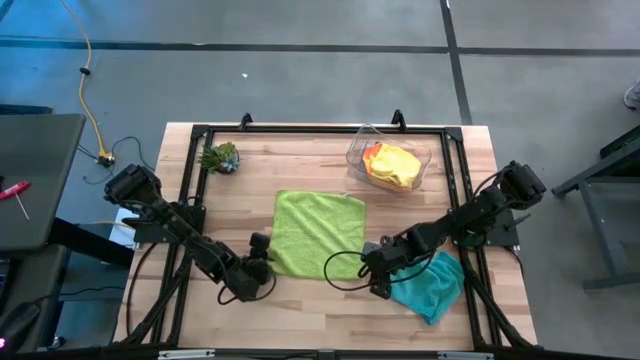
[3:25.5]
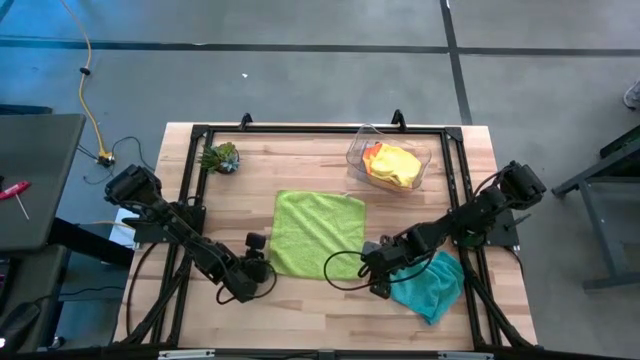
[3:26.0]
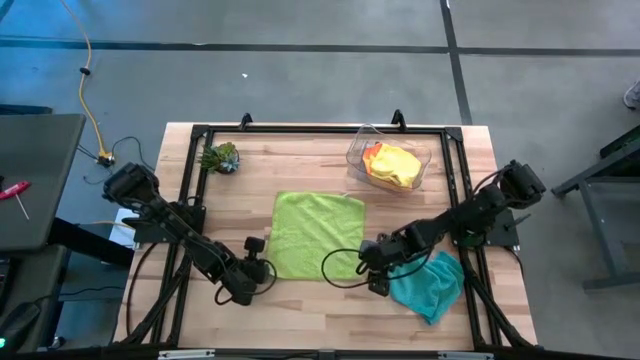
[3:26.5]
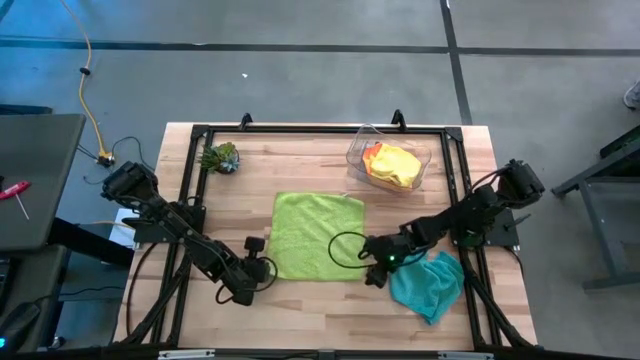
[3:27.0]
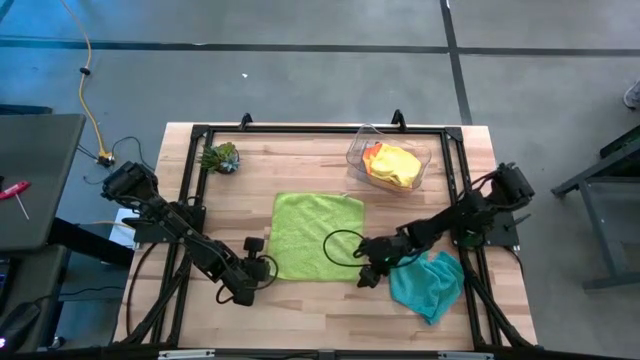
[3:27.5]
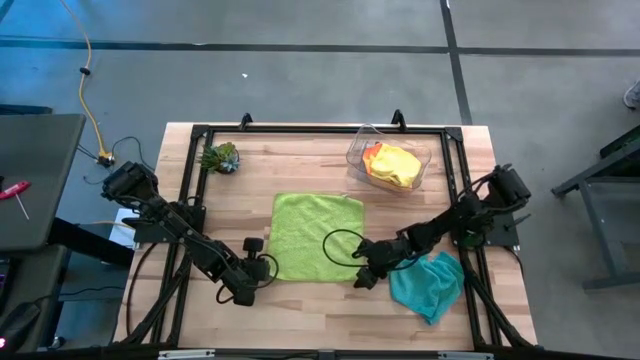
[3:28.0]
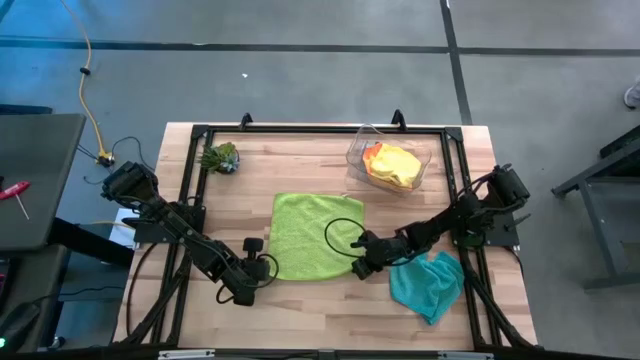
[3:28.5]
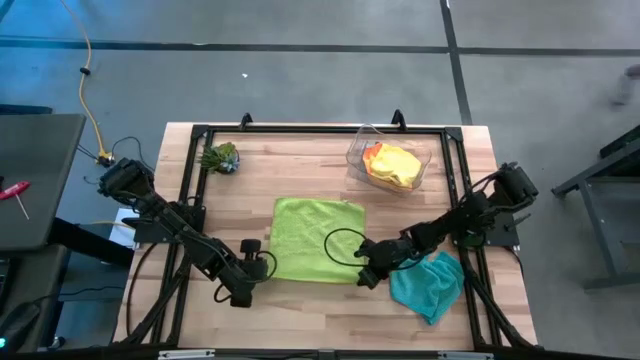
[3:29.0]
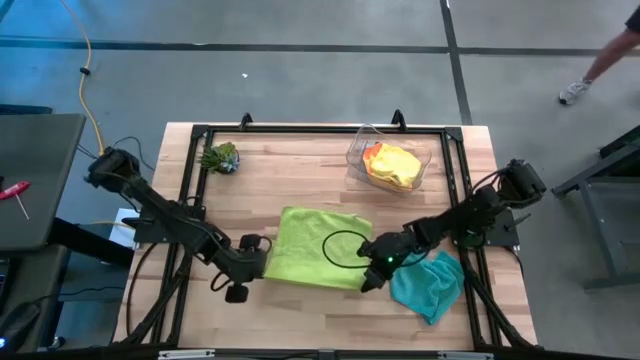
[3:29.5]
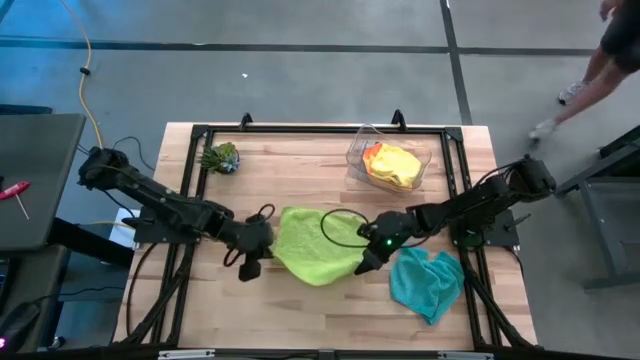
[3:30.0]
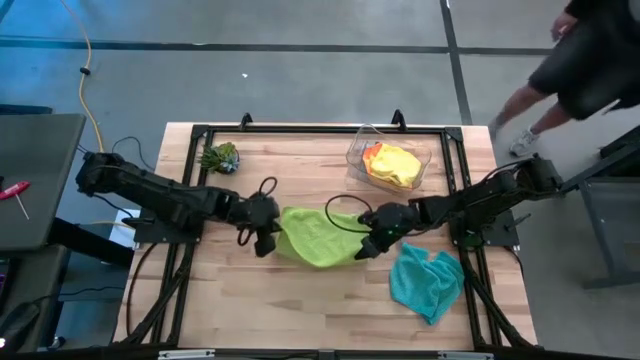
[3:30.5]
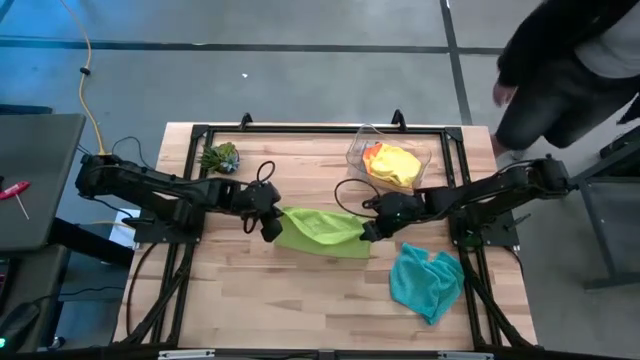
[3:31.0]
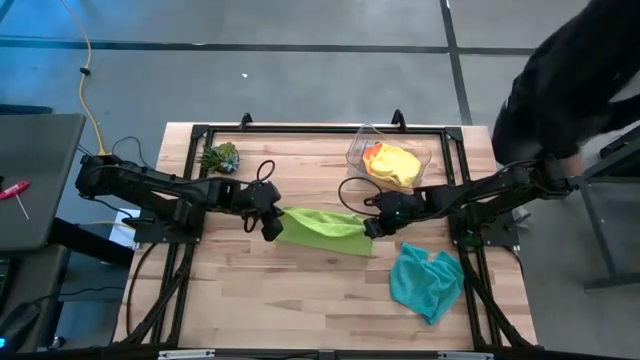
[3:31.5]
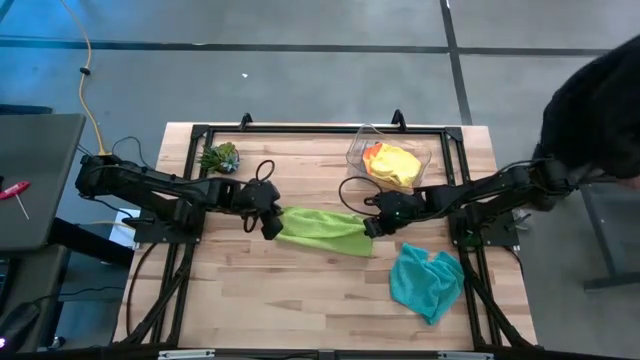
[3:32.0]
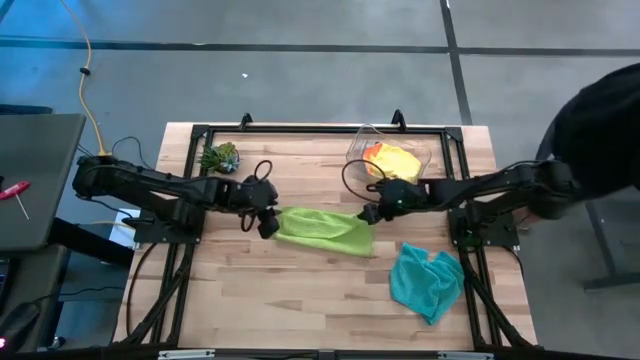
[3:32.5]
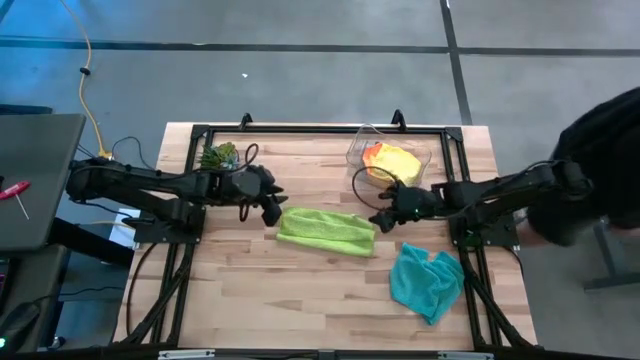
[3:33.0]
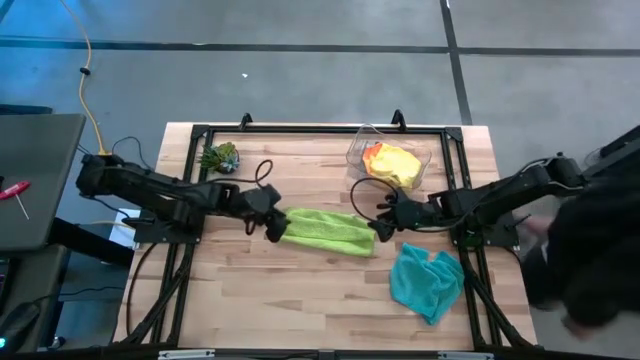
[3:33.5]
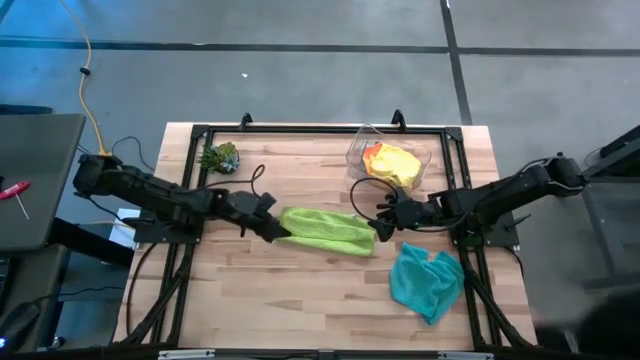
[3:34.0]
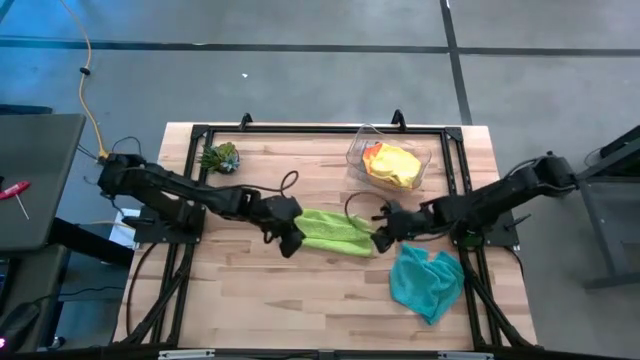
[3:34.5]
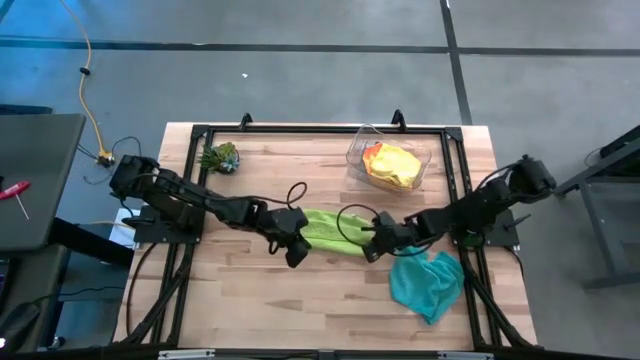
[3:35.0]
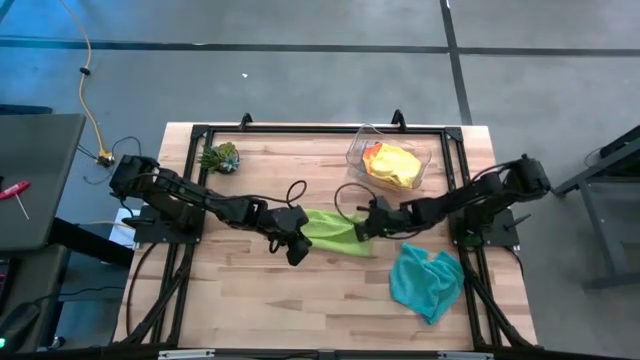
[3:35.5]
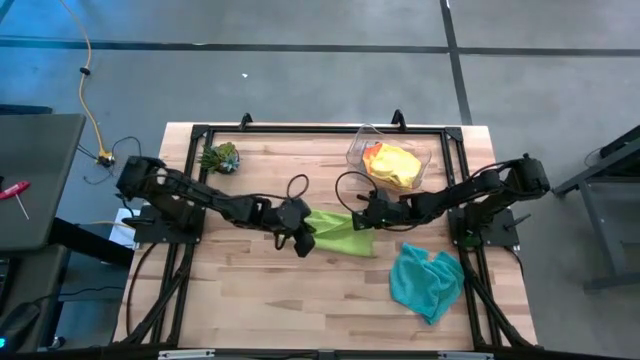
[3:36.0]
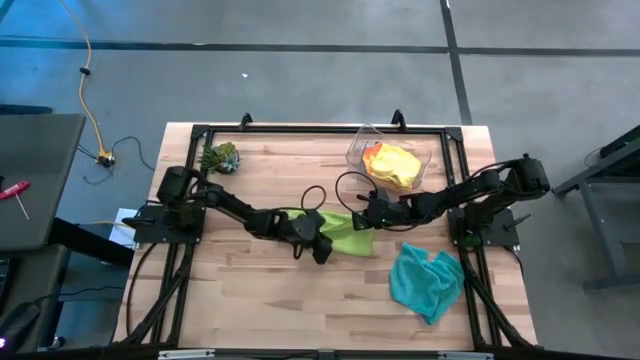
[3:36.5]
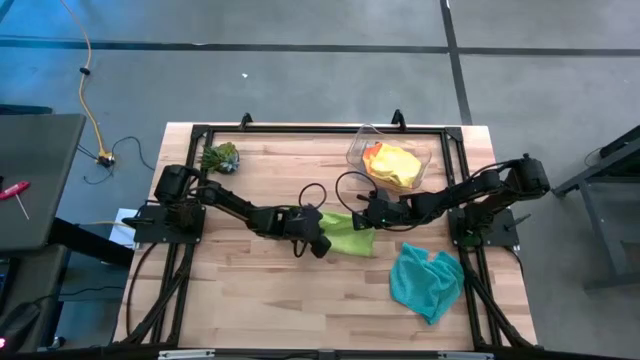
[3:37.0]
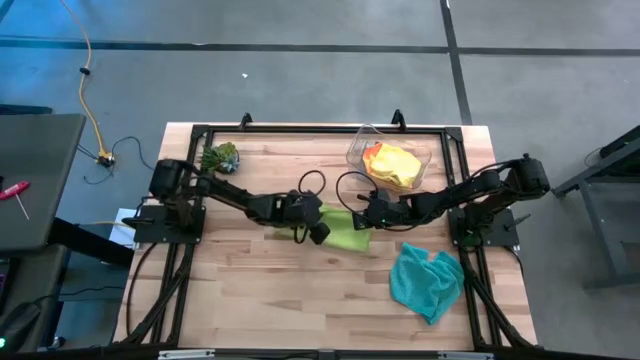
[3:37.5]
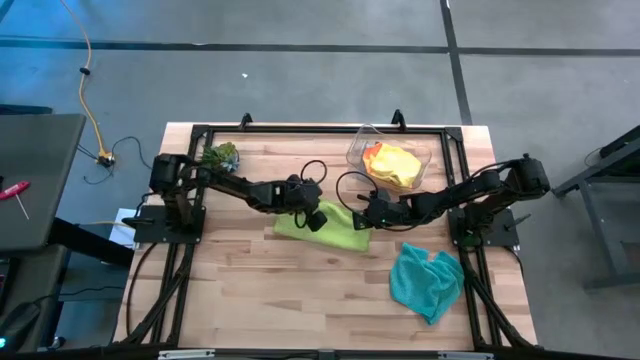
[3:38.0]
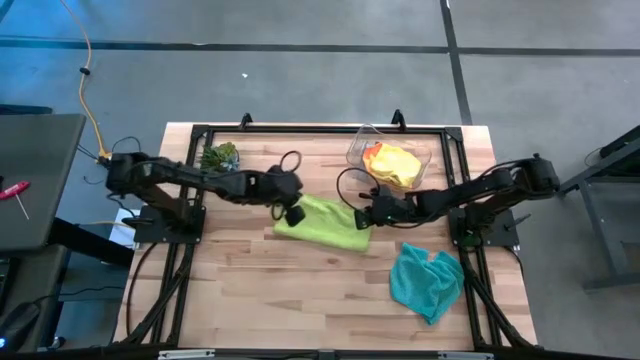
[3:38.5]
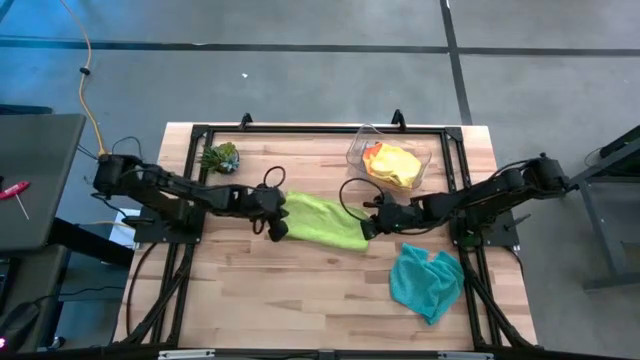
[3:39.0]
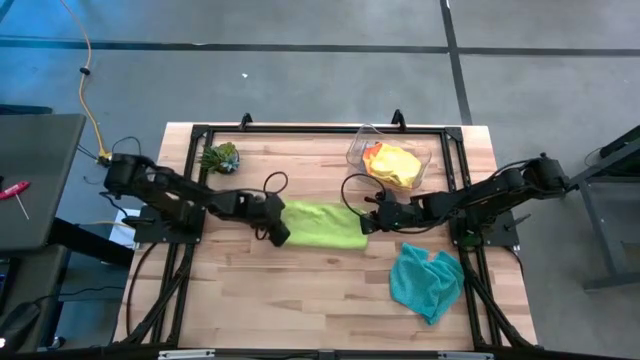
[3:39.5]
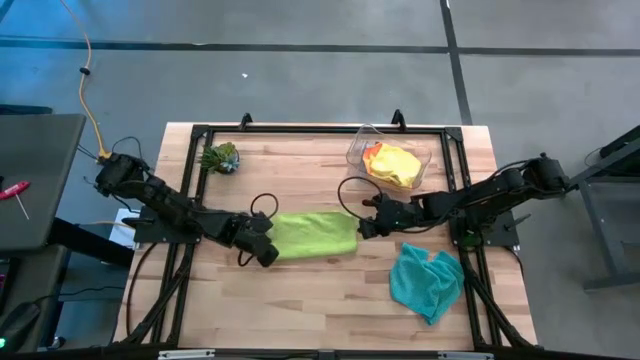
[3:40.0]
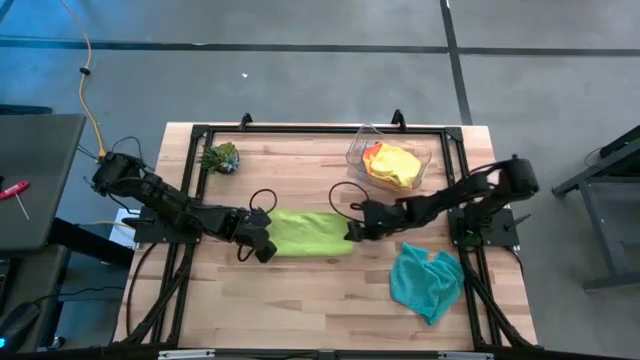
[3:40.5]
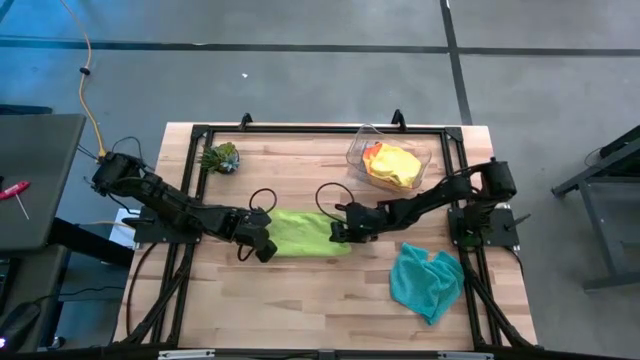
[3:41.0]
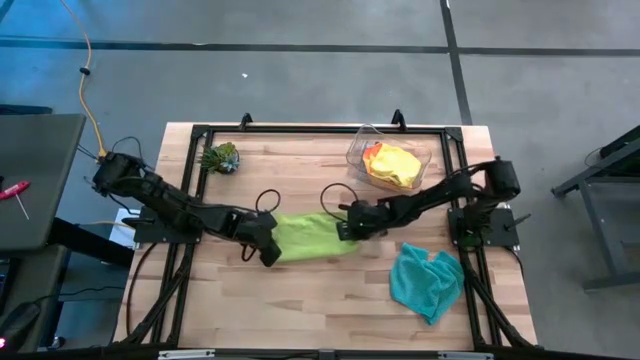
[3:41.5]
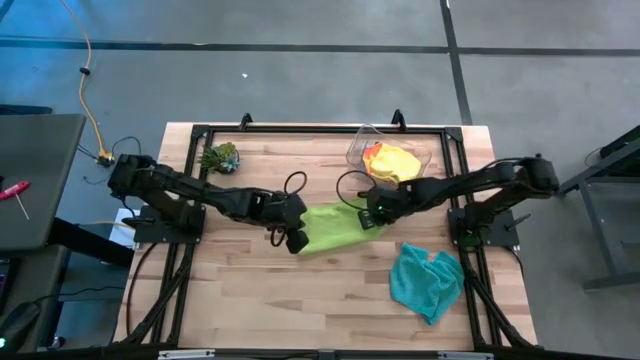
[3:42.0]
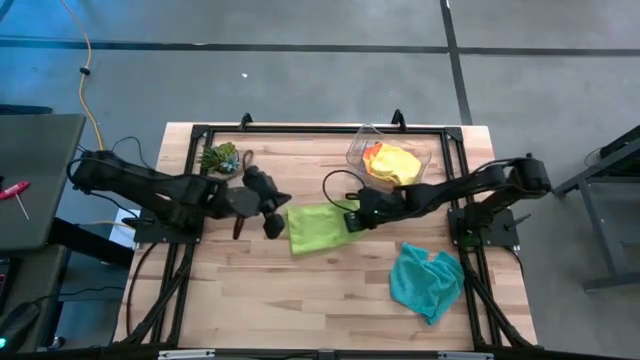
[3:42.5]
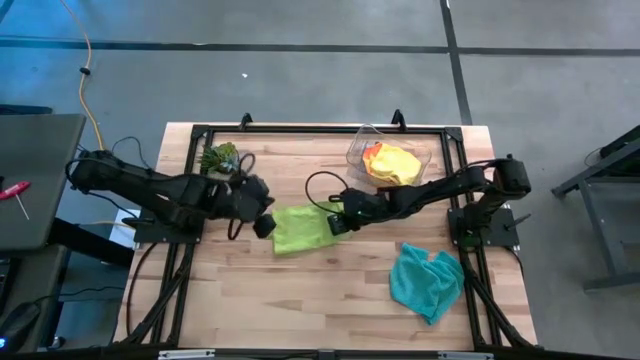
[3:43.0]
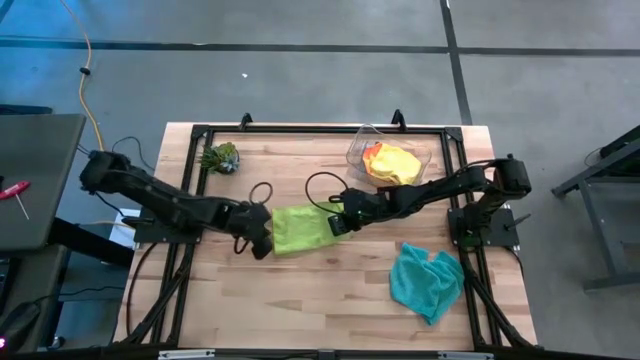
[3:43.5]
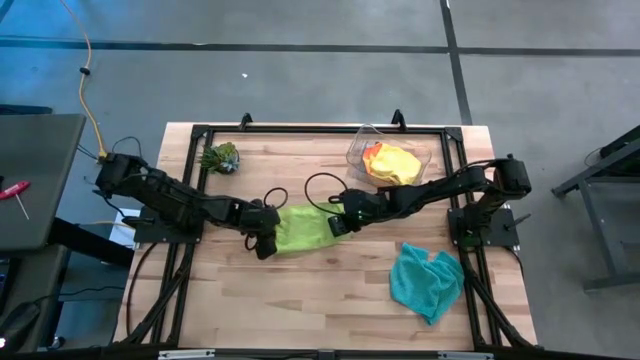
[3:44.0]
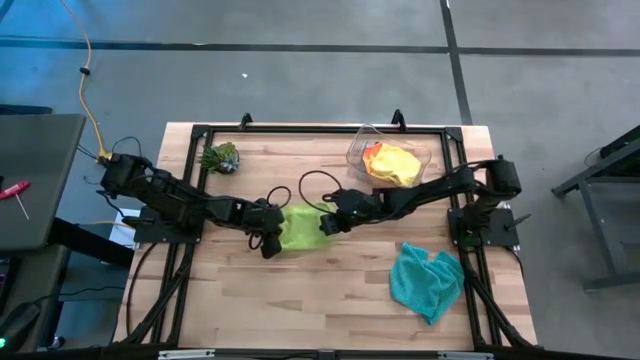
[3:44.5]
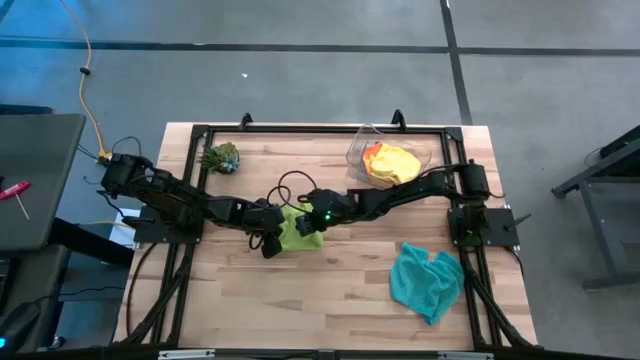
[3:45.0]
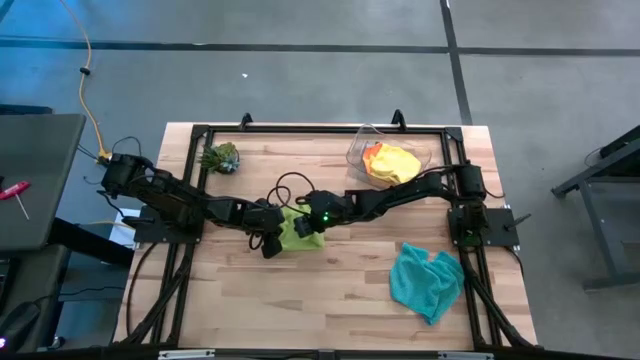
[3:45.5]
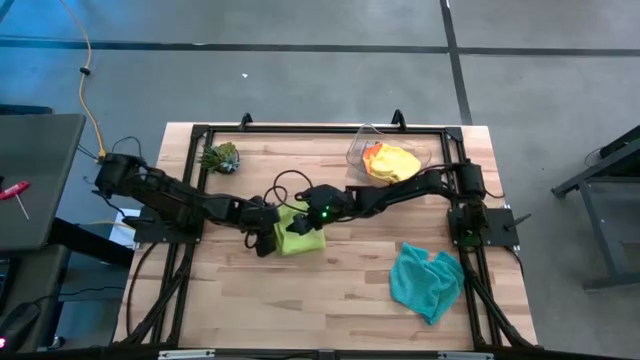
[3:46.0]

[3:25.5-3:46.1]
Task: Fold microfiber towels
Fold the green microfiber towel
